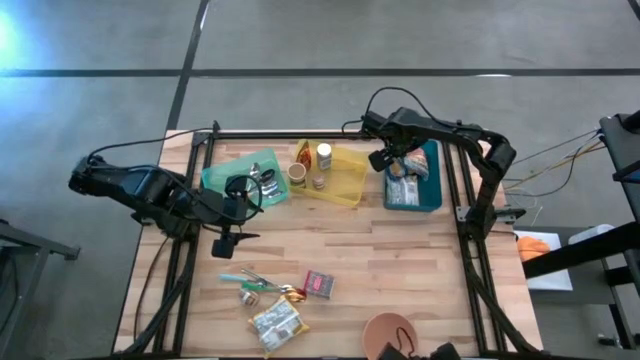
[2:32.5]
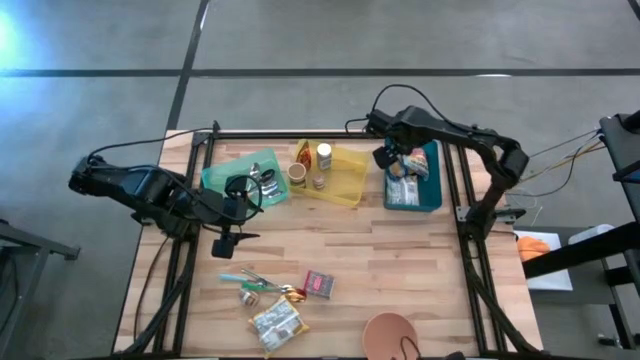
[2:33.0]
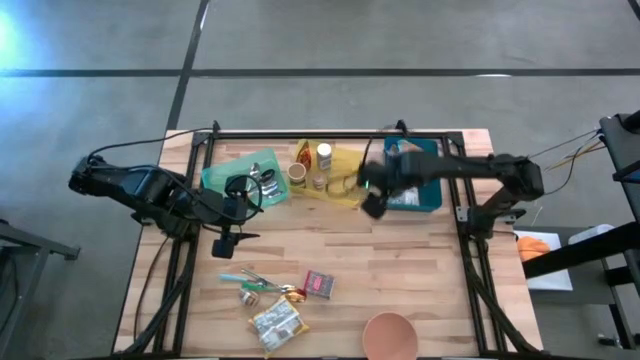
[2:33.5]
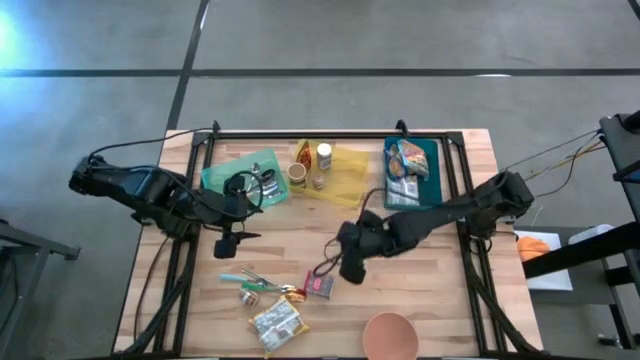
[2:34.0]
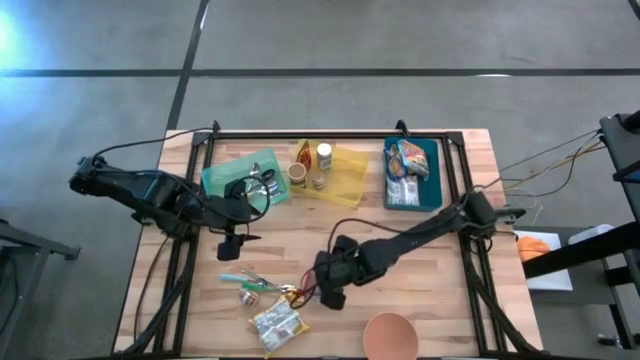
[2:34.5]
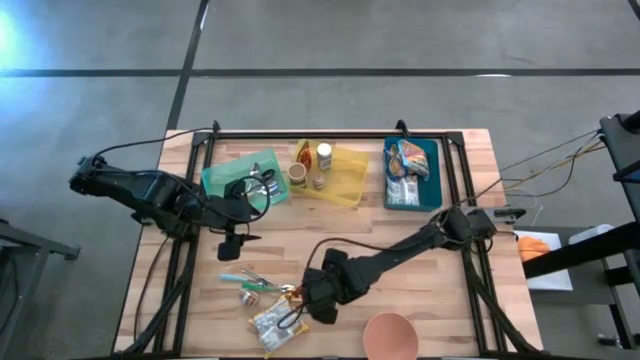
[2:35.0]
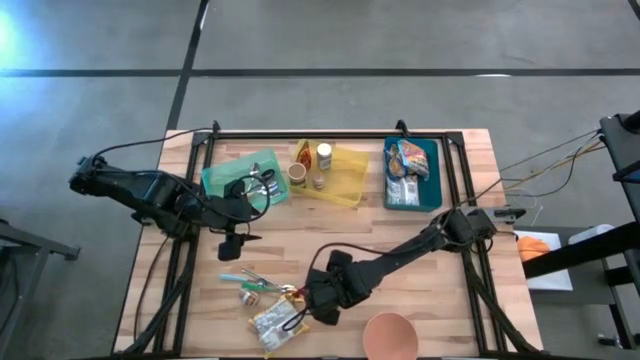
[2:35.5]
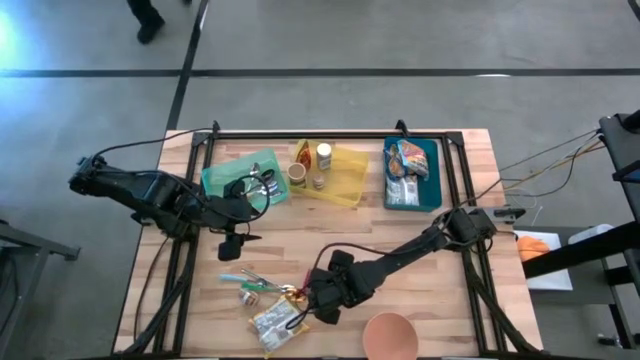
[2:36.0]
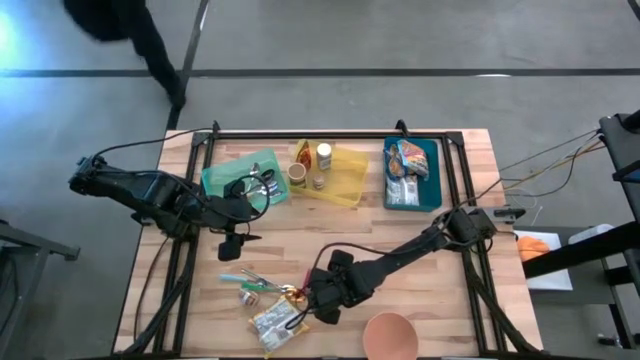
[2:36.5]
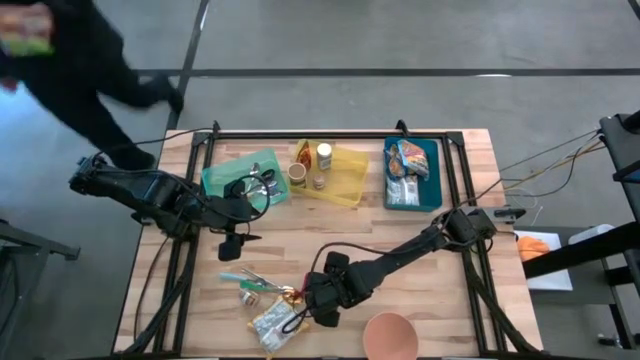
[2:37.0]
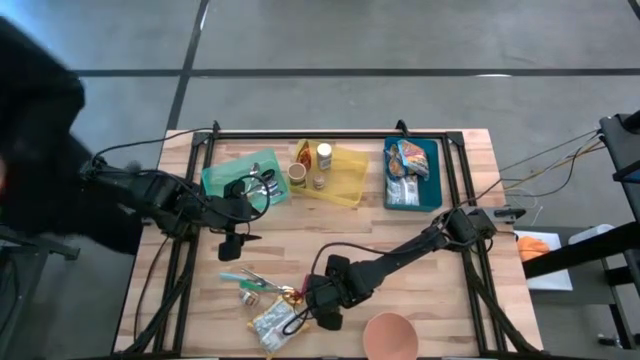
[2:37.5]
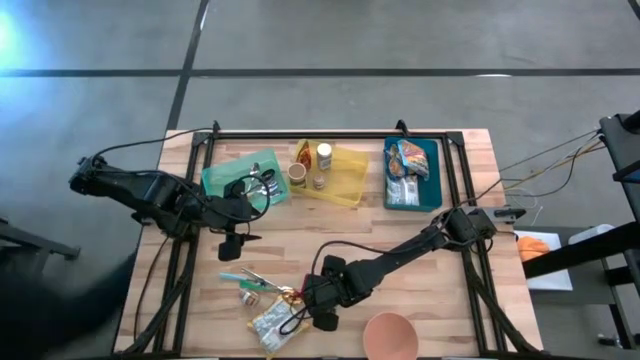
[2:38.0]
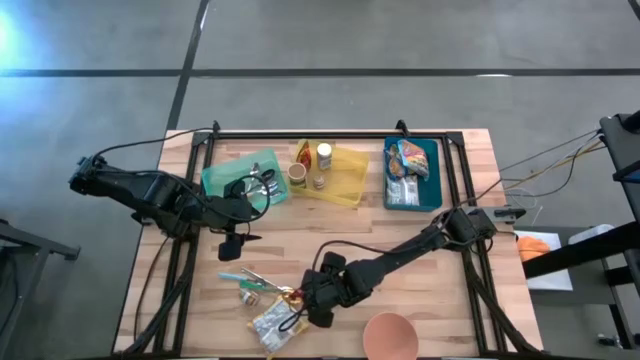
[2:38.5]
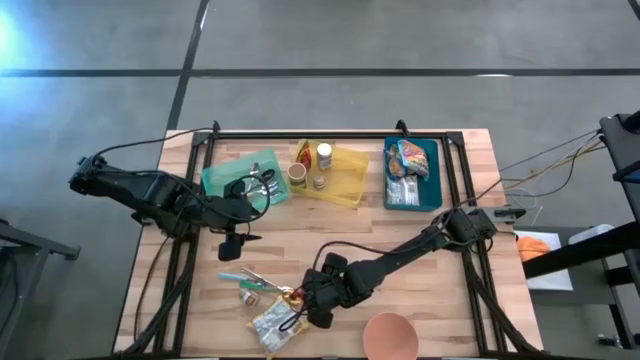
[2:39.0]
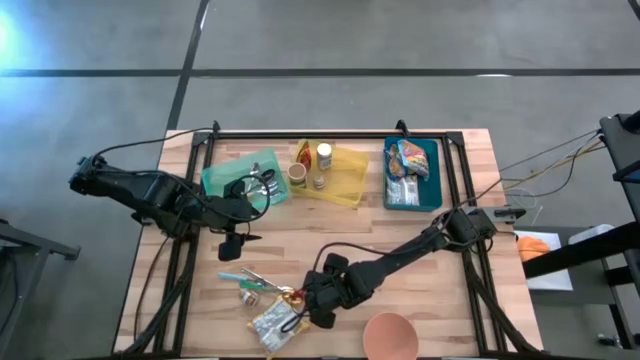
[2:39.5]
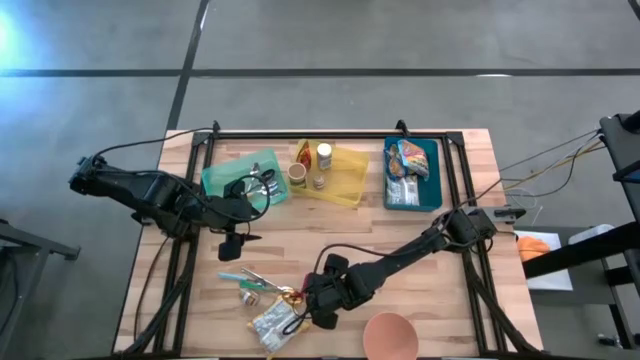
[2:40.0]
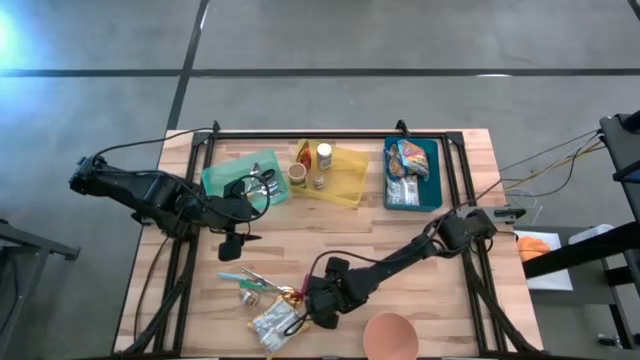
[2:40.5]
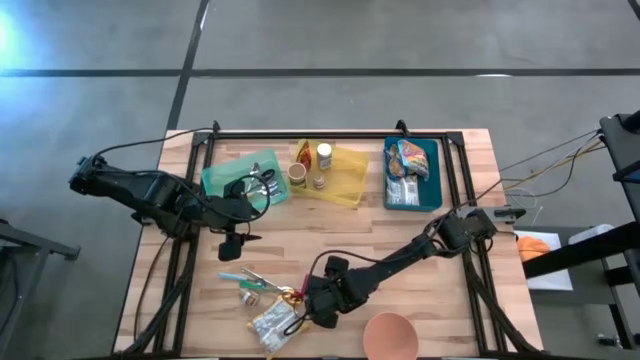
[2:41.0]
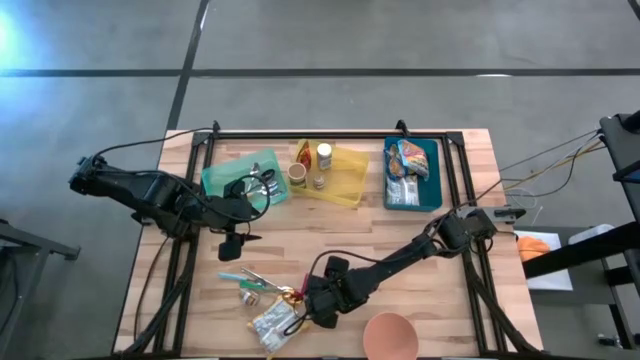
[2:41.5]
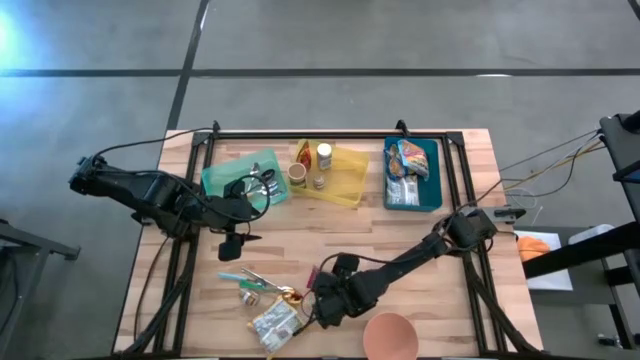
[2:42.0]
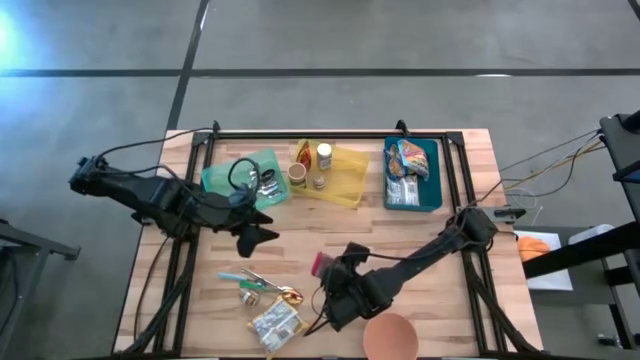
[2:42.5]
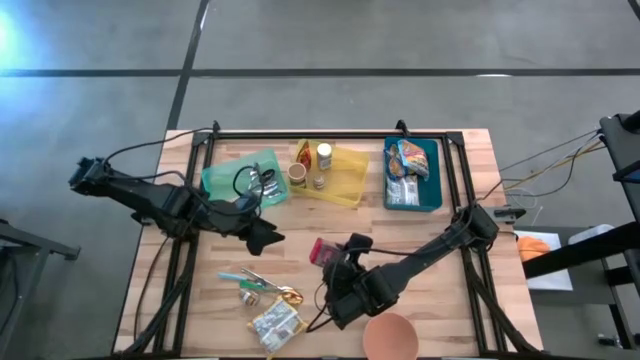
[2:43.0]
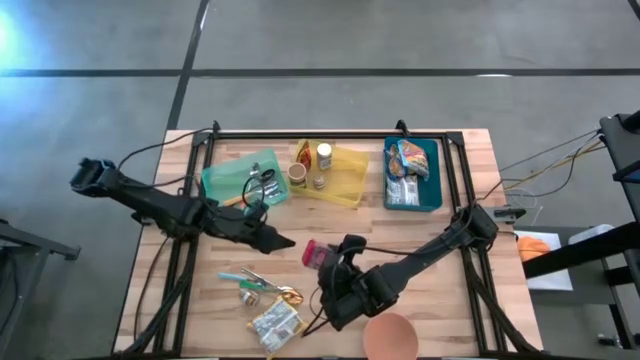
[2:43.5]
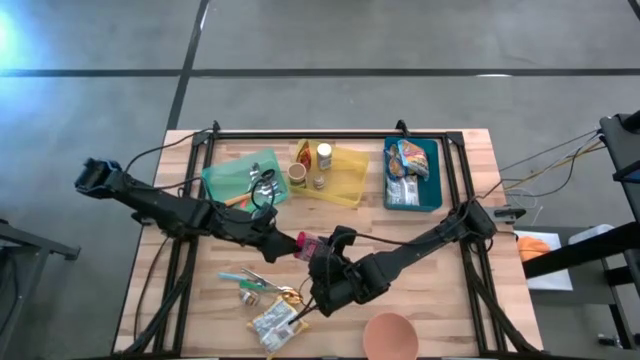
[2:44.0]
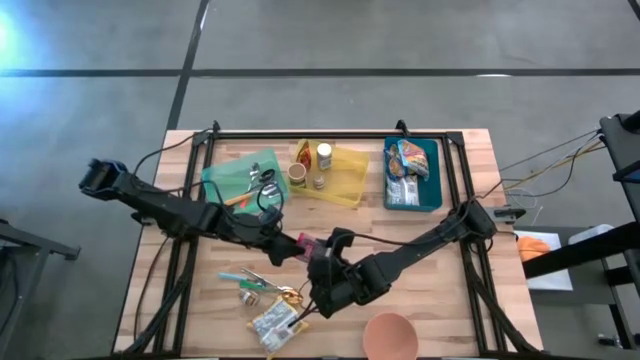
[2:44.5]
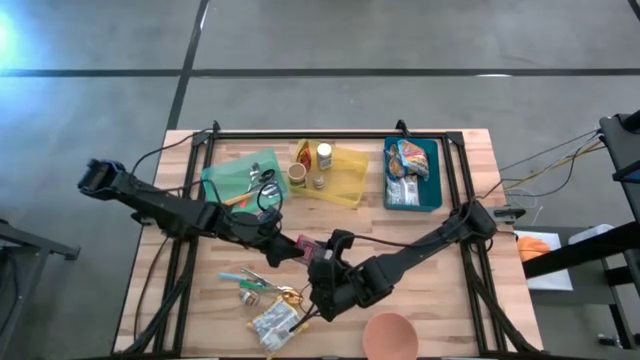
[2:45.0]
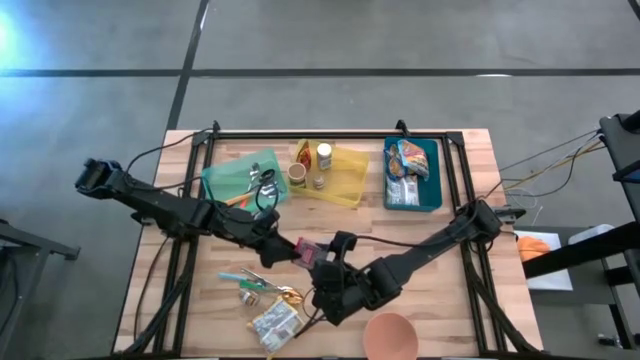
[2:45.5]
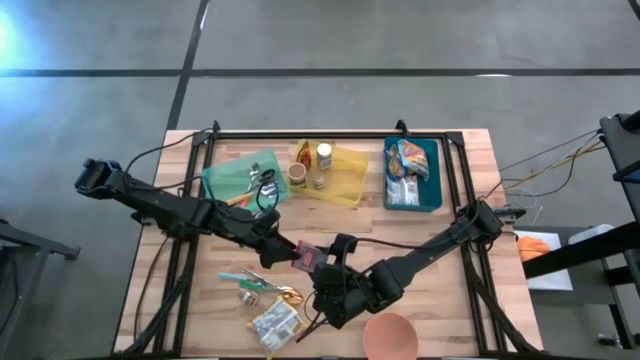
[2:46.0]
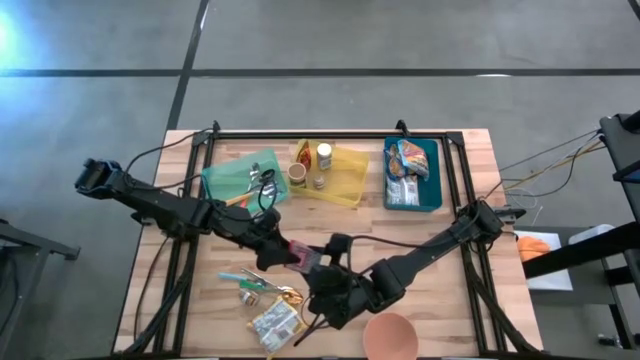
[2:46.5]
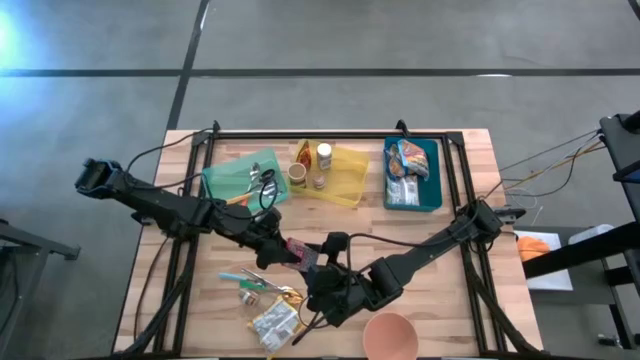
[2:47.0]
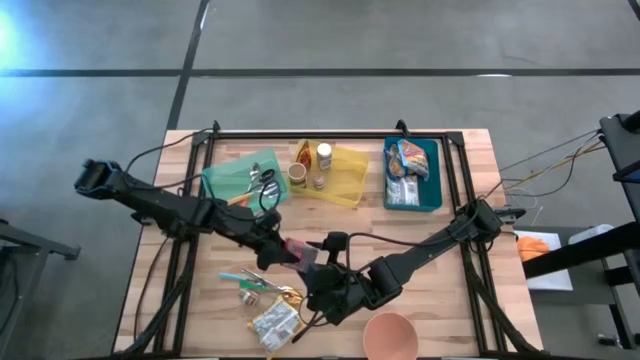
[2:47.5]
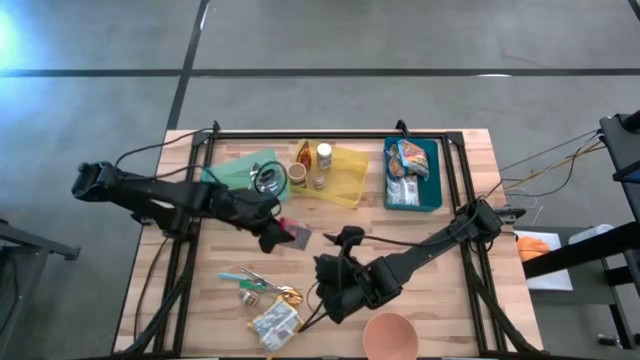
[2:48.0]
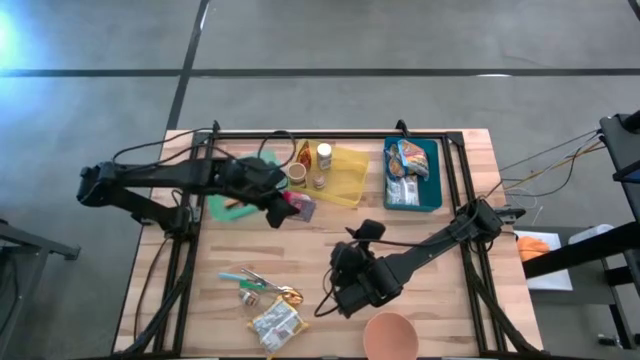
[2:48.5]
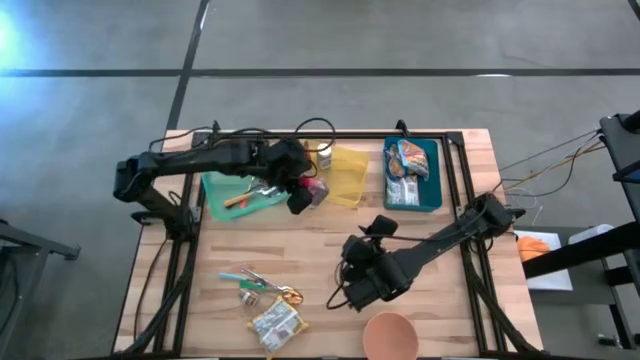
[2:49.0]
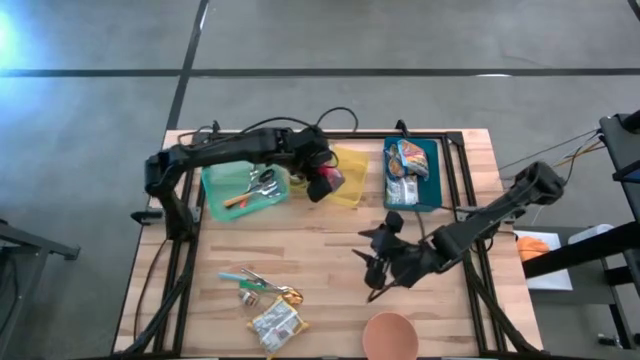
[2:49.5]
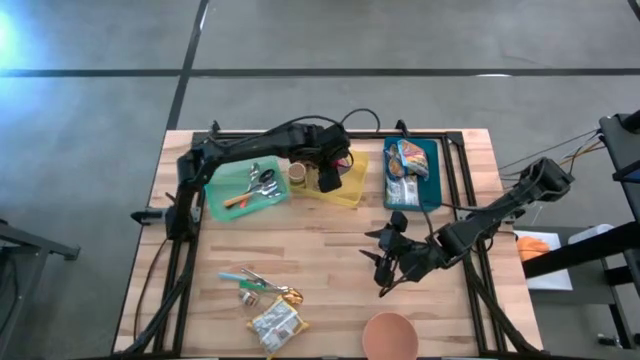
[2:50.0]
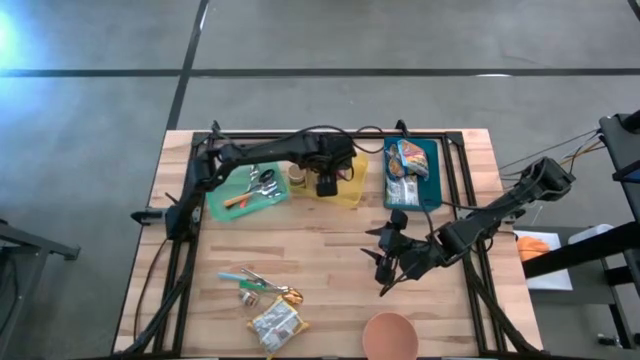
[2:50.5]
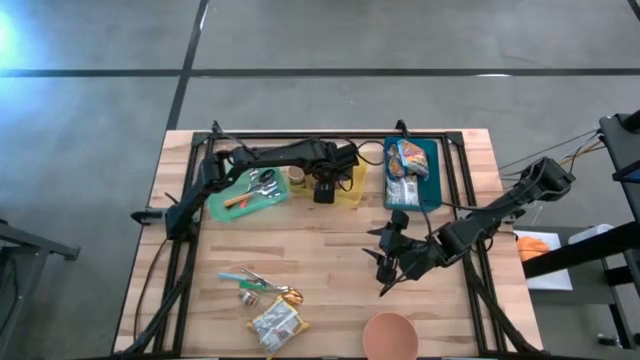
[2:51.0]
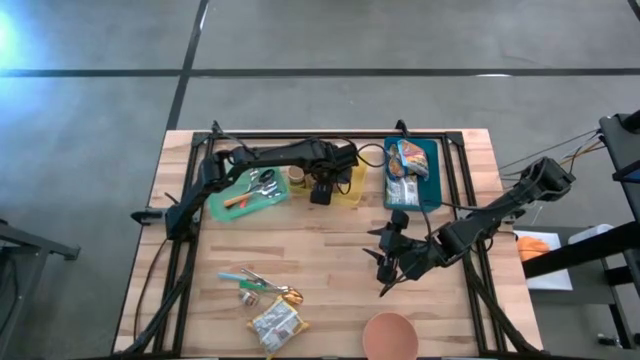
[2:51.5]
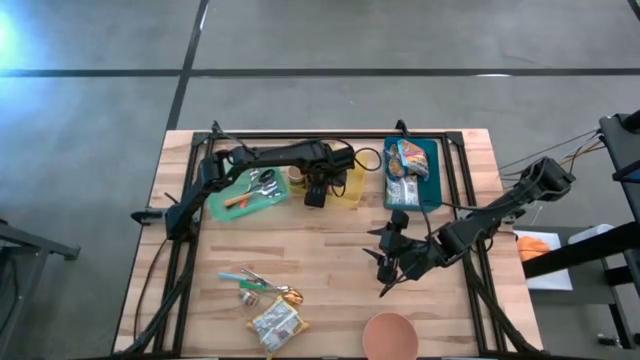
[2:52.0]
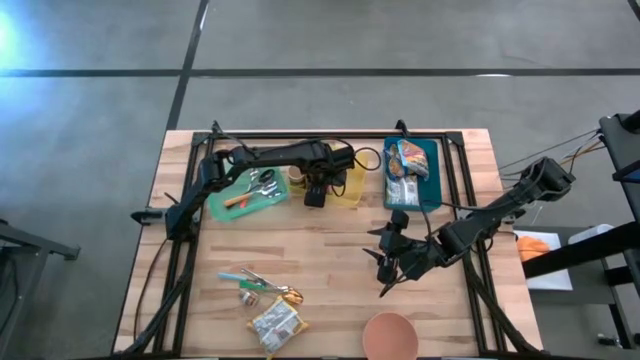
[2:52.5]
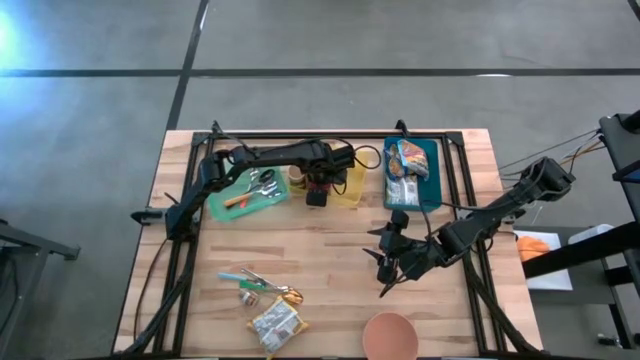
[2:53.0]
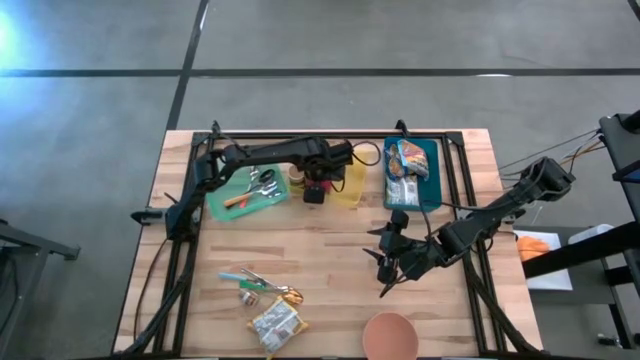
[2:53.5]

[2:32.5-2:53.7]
Put the red seasoning can into the yellow bin
